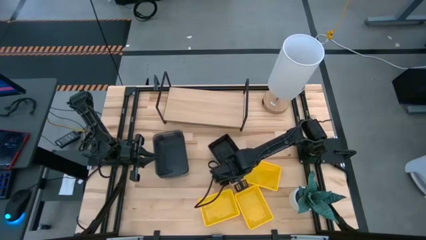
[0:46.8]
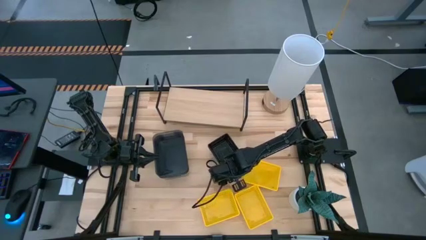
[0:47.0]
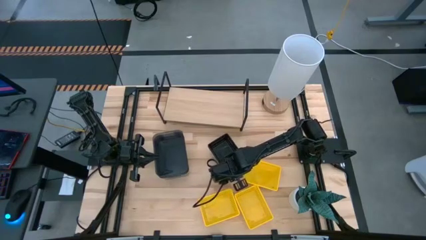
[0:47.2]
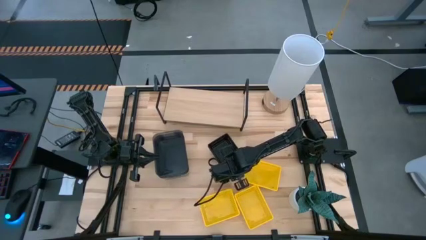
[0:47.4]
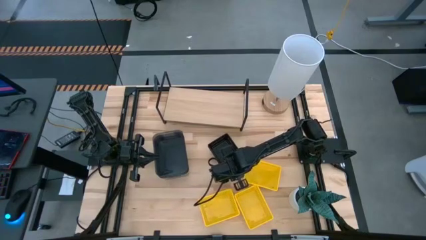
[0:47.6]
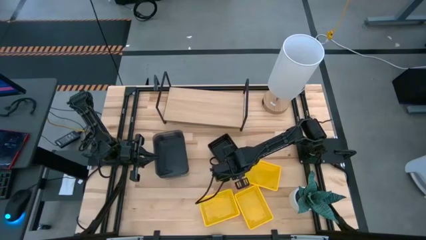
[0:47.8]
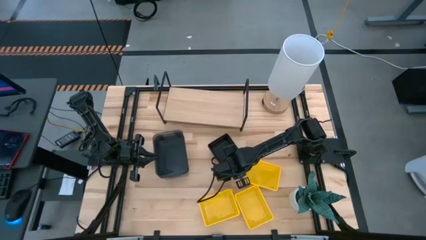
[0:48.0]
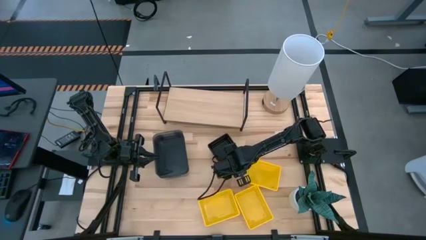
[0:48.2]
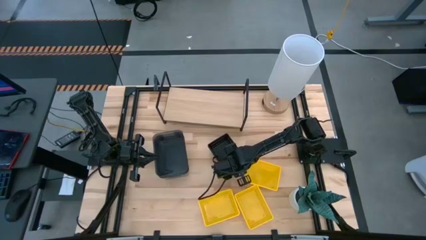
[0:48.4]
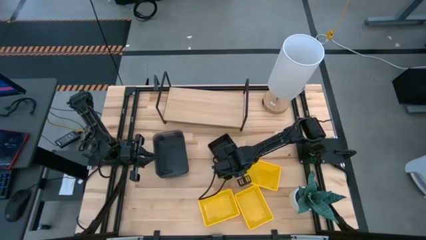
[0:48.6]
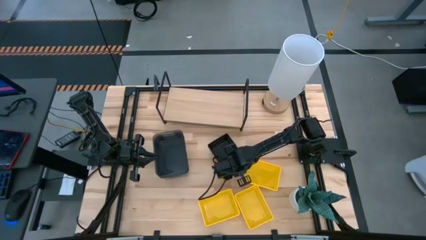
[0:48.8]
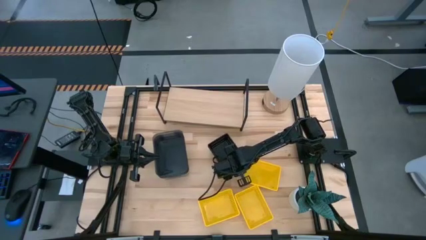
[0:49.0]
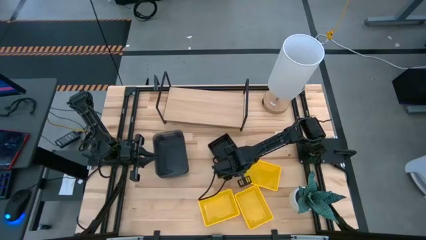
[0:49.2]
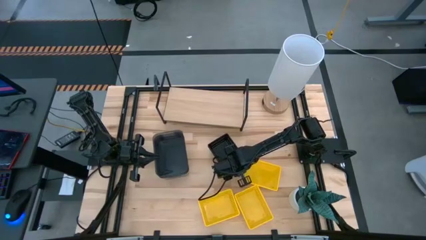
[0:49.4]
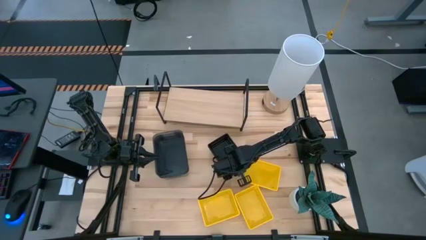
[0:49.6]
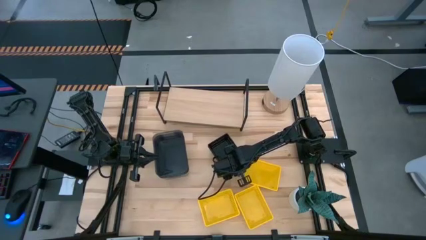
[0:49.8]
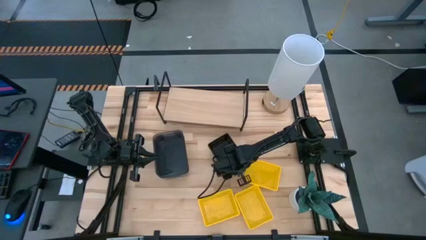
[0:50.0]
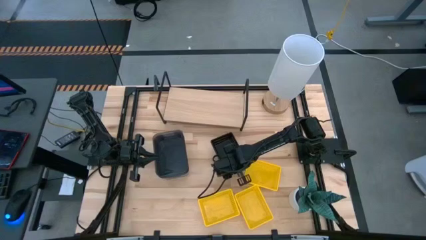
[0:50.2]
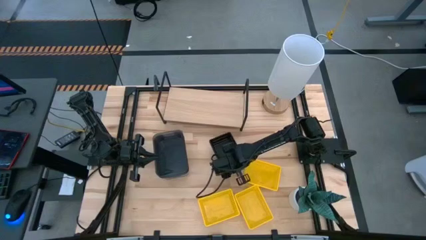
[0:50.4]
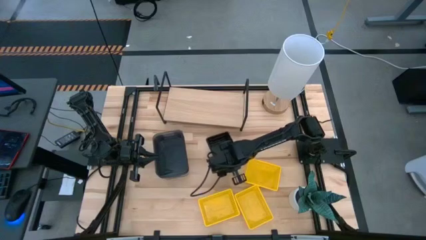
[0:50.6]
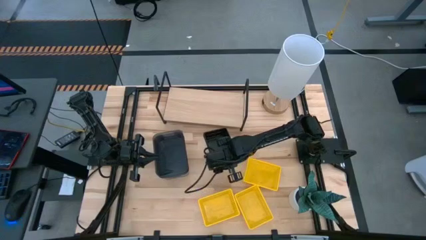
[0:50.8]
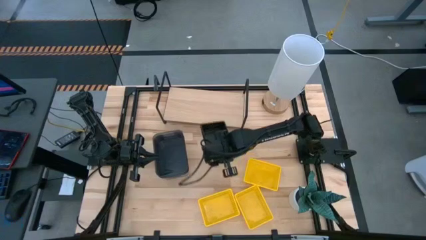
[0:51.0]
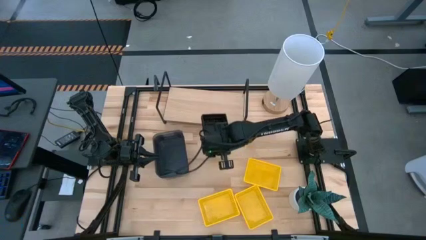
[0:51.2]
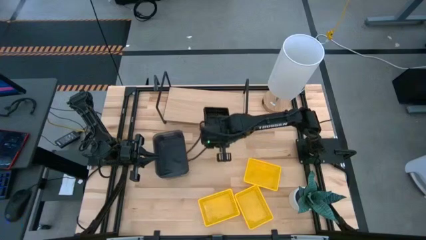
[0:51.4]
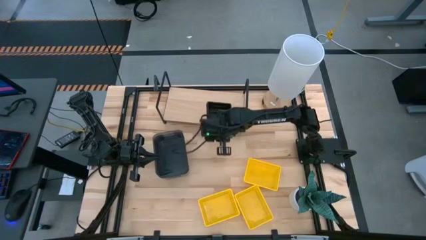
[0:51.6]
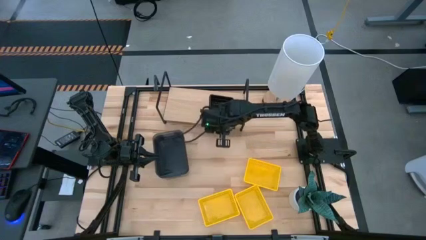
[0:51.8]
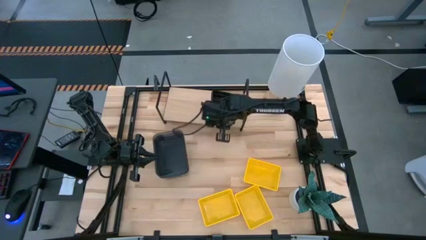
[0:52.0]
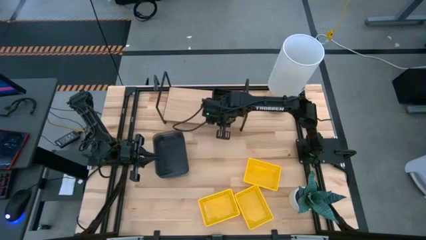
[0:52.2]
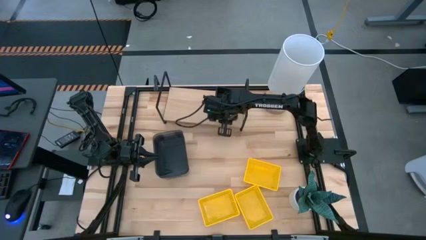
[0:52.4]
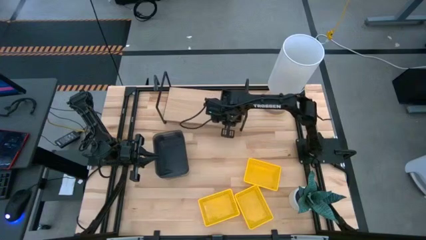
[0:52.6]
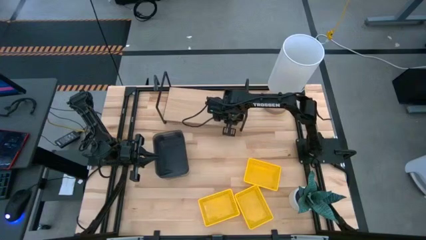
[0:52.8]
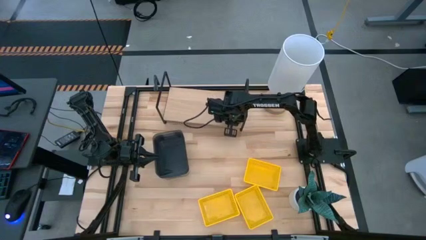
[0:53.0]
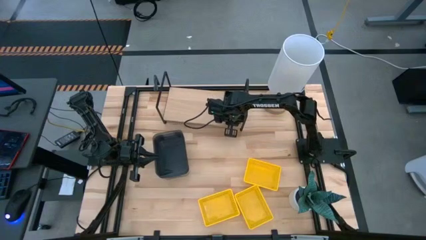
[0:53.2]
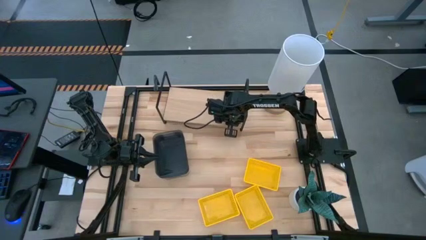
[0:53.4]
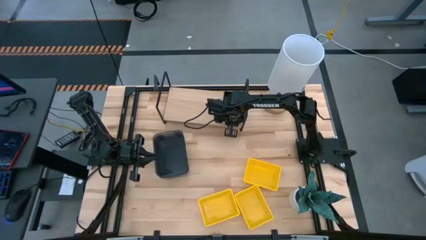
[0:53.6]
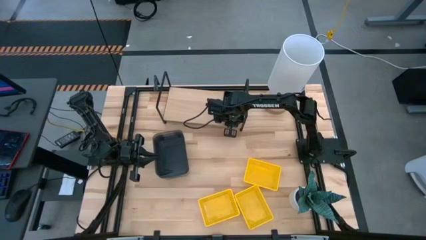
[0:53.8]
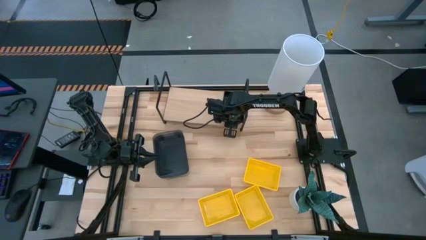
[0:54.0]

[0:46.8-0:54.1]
Task: Stack baskets on shelf by color
Put the stacked black baskets on the shelf
